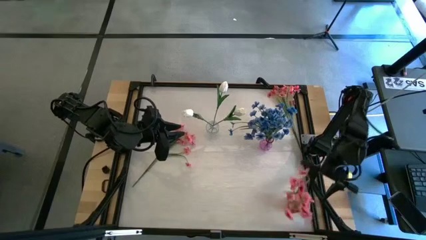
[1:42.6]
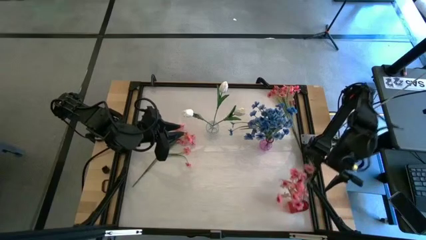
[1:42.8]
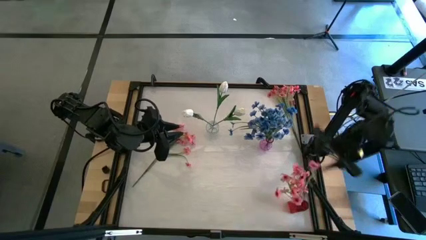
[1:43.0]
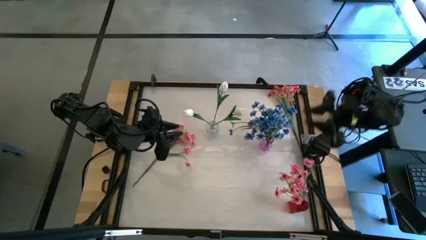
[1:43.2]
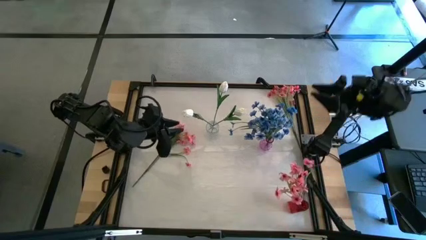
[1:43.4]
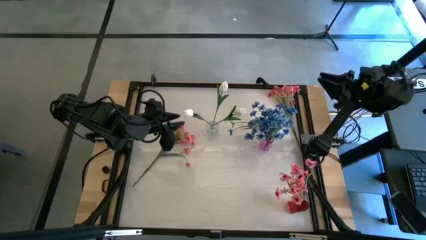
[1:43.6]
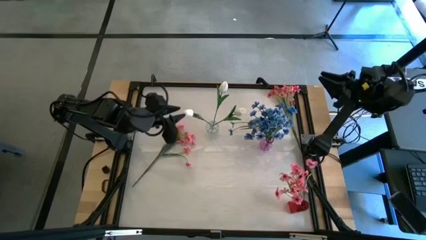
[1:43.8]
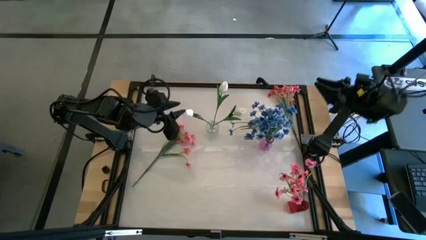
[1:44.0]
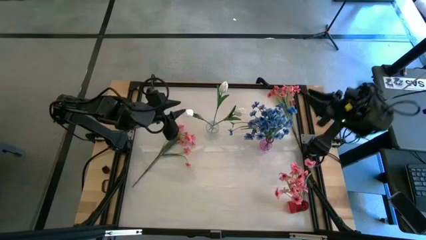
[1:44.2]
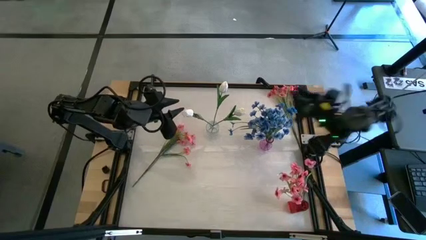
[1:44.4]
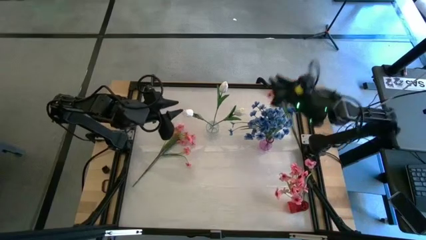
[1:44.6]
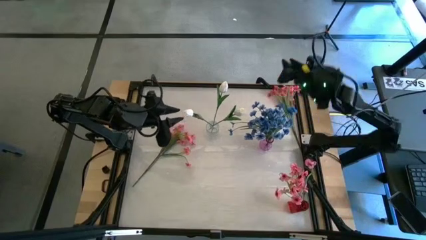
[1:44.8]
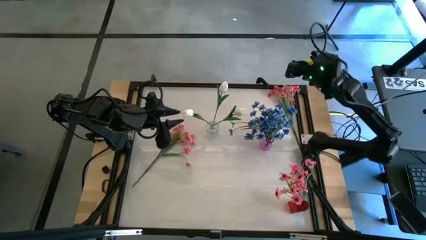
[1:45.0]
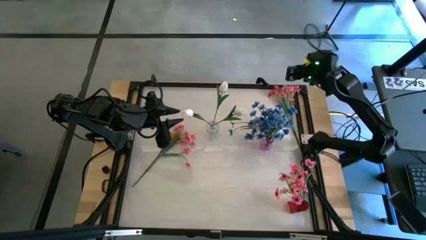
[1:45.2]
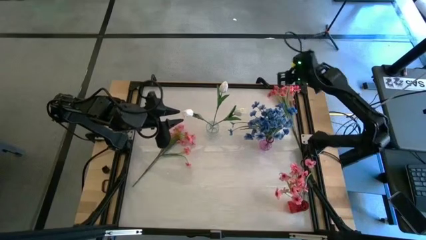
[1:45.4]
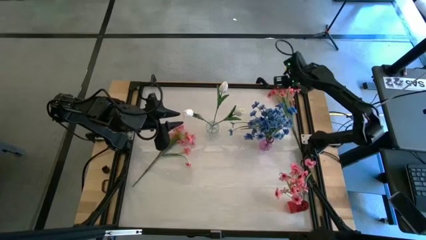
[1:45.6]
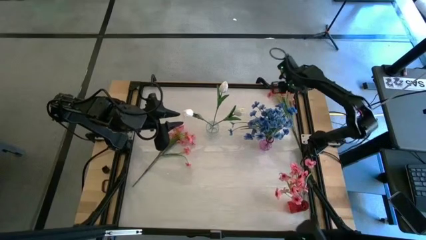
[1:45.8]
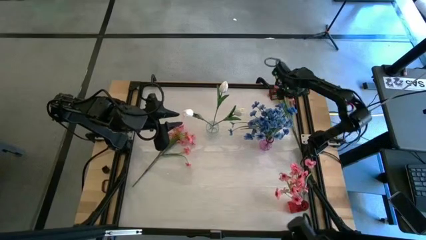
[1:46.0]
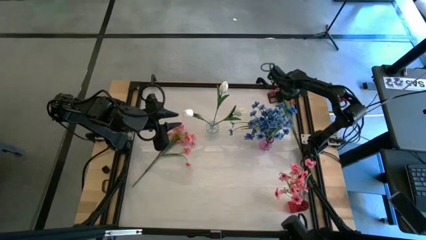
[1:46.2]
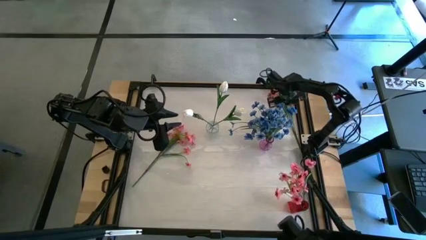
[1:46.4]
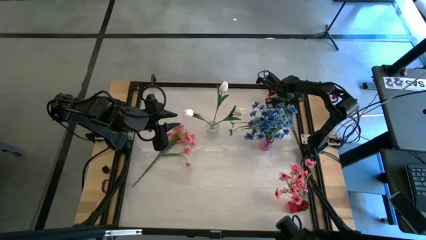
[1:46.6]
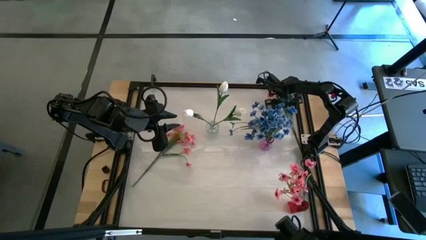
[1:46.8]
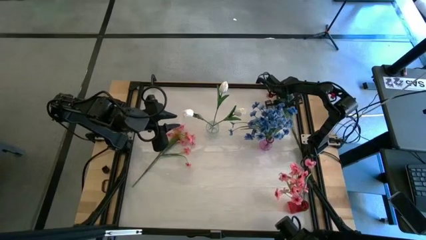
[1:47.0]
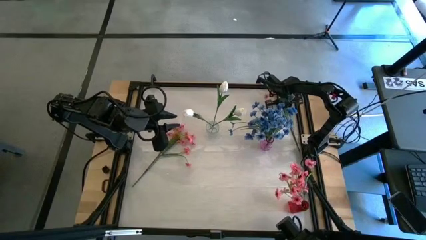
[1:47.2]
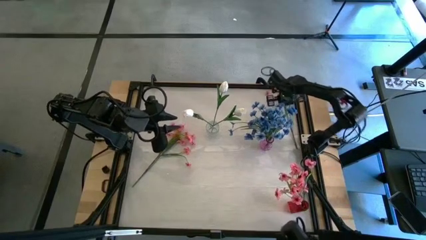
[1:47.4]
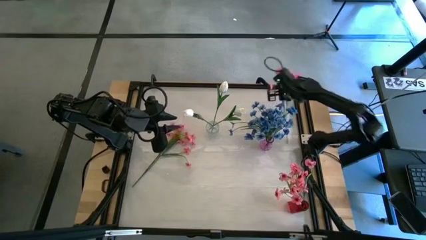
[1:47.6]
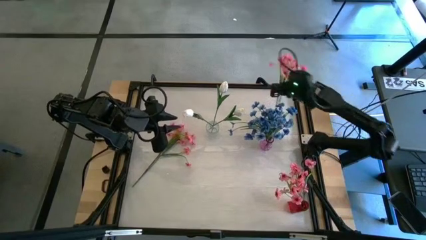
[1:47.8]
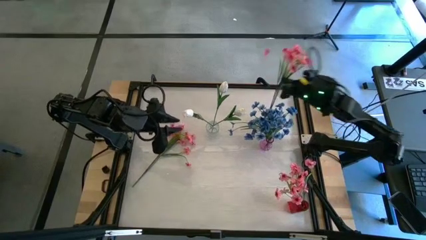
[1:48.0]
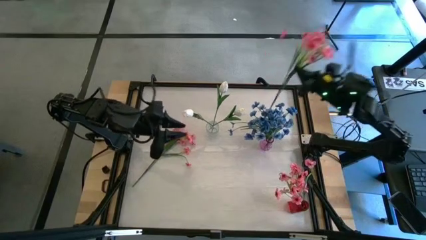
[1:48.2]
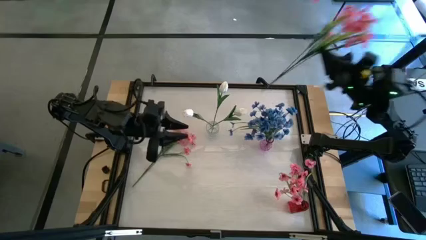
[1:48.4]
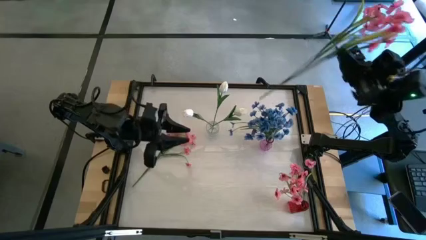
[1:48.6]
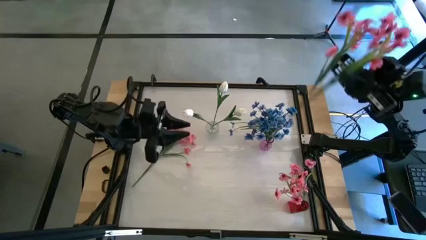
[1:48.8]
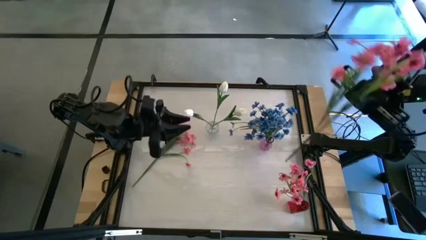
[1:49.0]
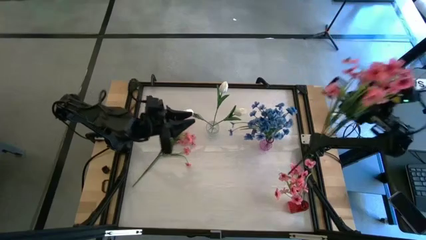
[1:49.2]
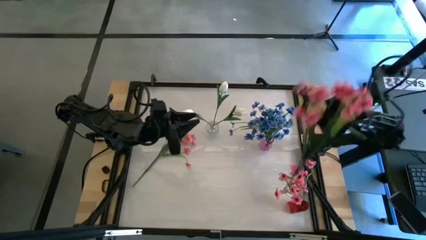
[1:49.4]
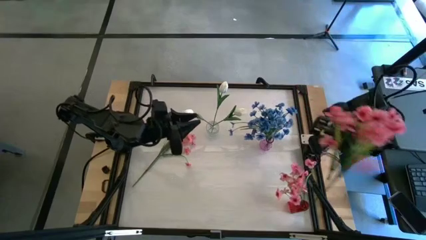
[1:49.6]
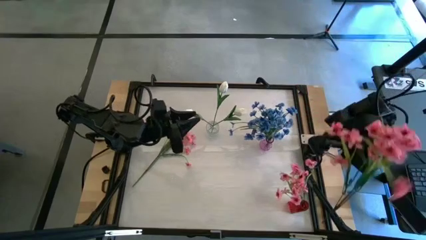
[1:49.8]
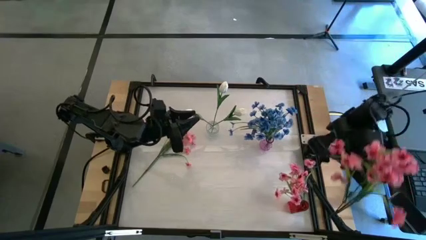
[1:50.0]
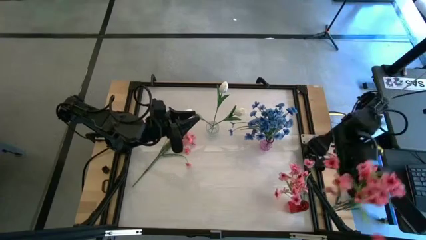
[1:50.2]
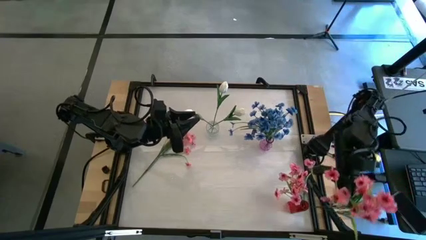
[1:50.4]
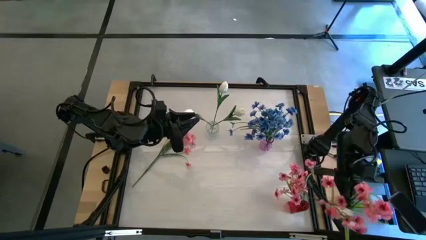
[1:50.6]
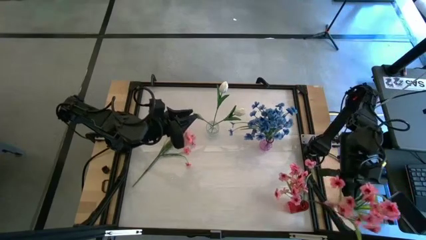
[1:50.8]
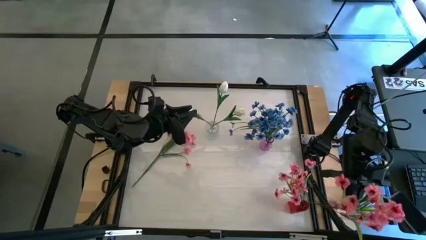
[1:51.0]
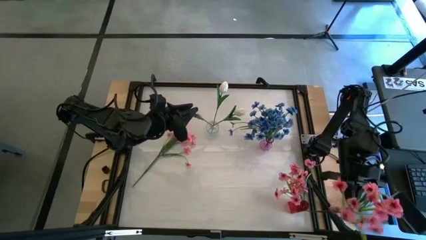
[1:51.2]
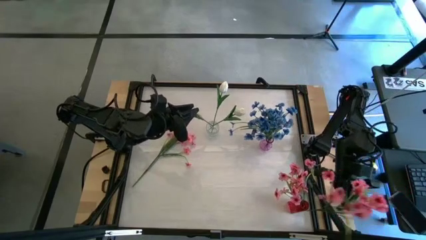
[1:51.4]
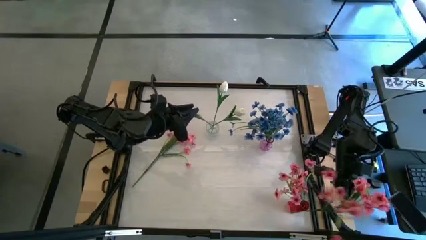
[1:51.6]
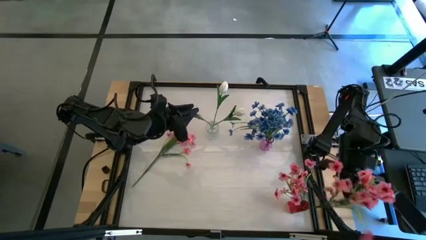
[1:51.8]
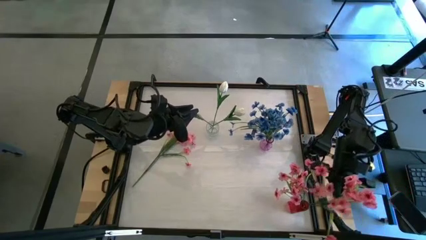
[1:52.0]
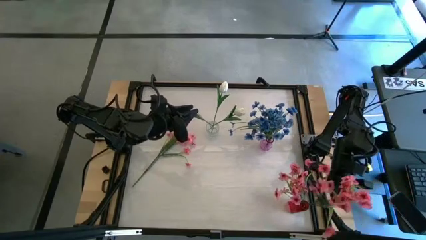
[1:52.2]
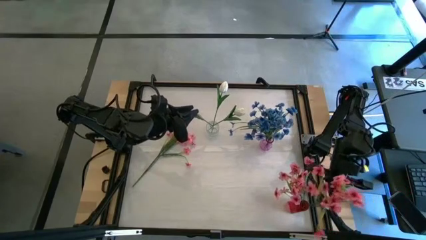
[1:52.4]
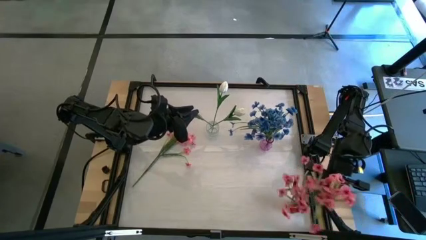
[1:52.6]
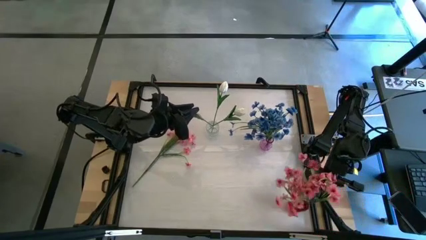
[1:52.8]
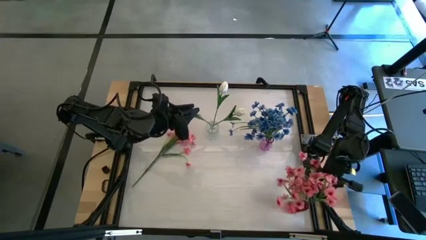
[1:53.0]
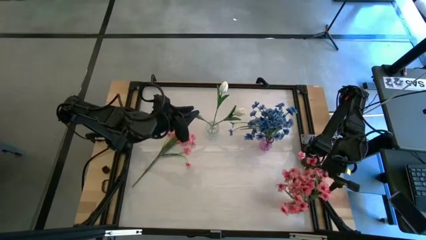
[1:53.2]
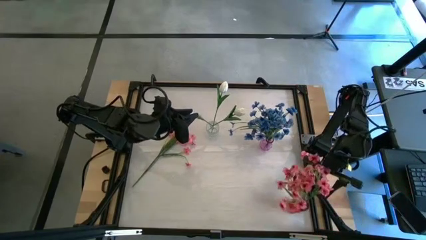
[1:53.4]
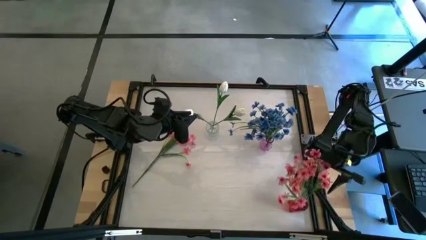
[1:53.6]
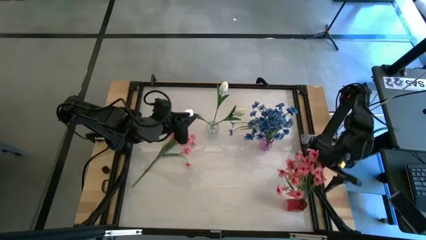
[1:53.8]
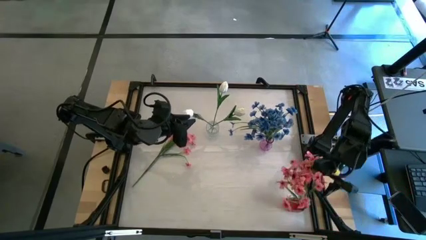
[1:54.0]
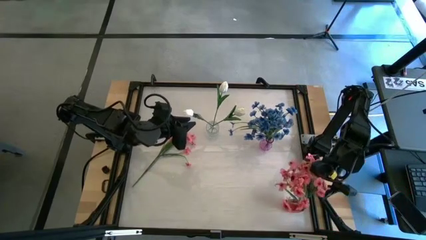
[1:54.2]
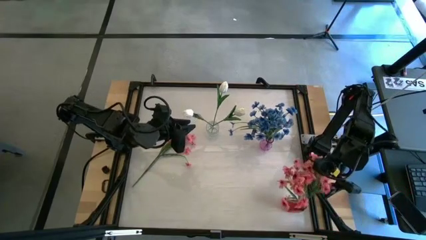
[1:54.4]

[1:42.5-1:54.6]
Task: Sort flowers into vase by color
Put the right pink flower into the red vase

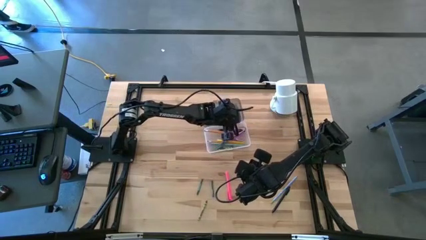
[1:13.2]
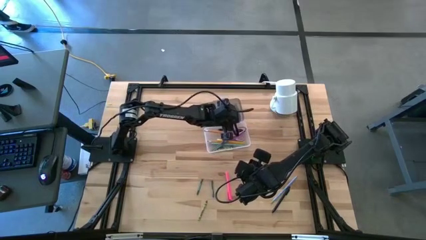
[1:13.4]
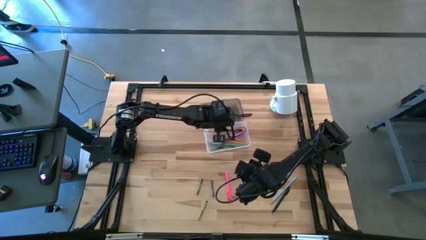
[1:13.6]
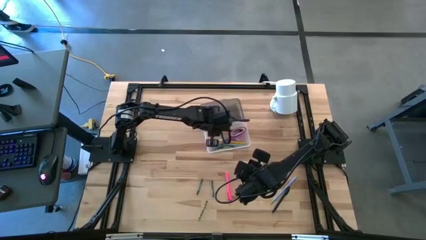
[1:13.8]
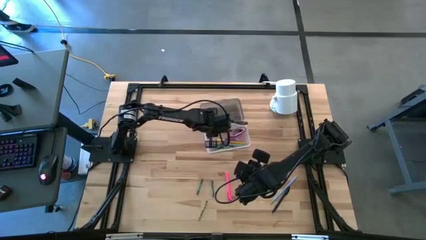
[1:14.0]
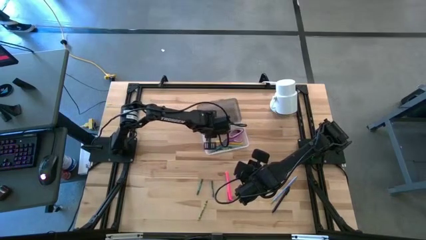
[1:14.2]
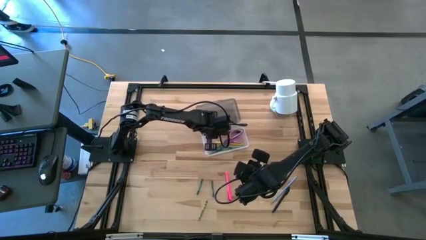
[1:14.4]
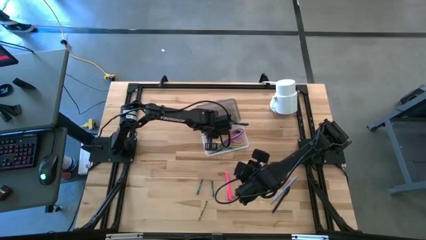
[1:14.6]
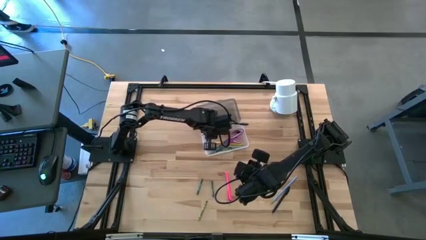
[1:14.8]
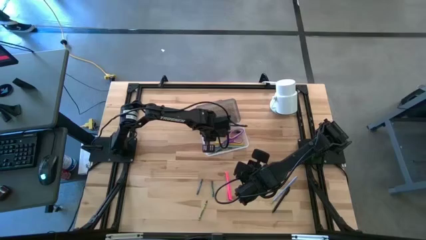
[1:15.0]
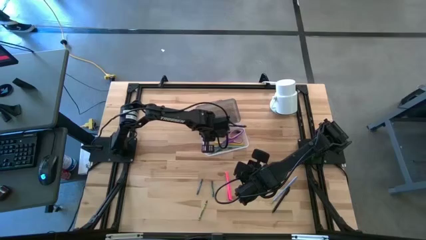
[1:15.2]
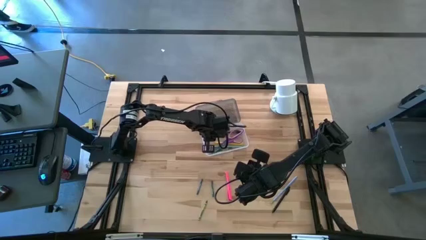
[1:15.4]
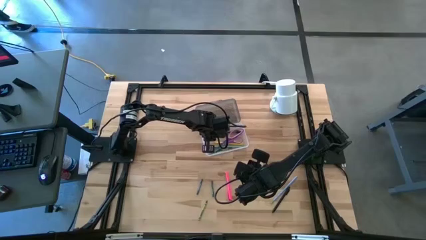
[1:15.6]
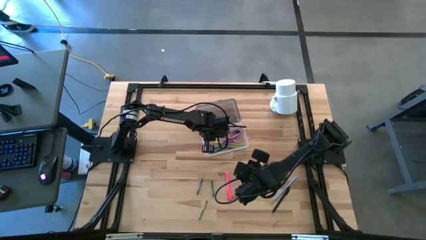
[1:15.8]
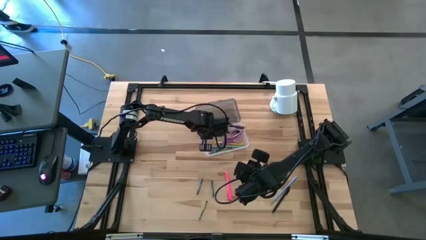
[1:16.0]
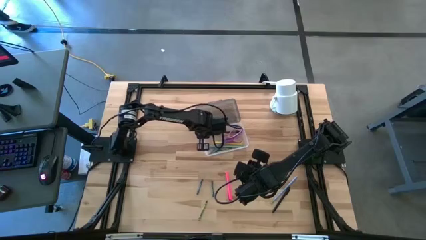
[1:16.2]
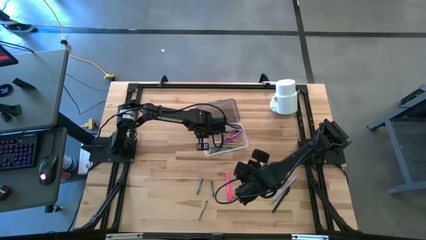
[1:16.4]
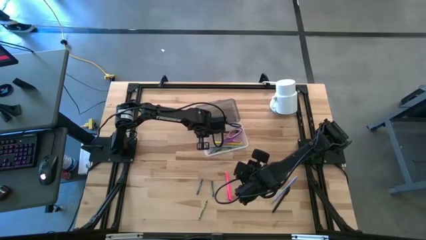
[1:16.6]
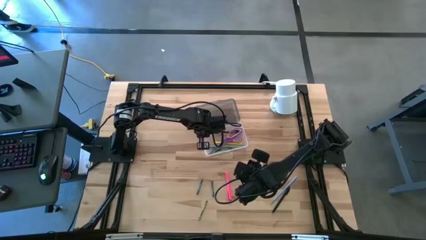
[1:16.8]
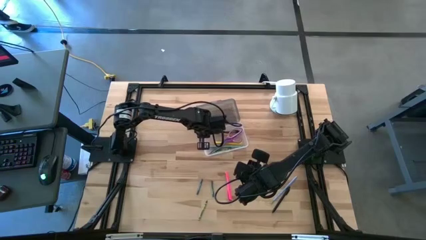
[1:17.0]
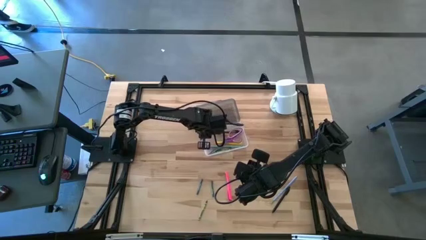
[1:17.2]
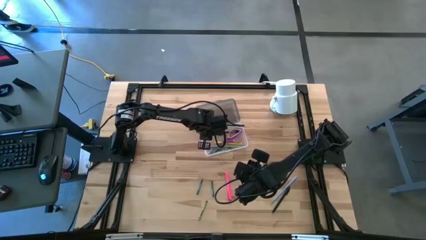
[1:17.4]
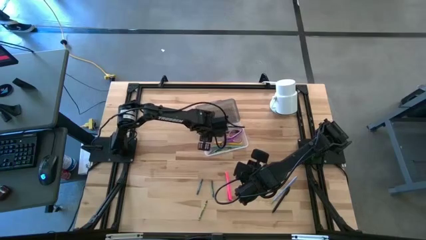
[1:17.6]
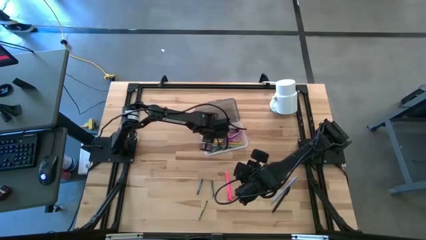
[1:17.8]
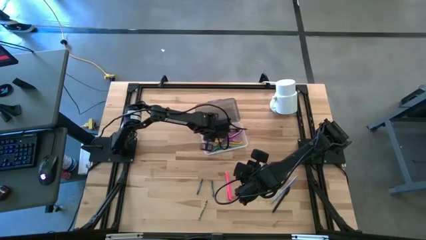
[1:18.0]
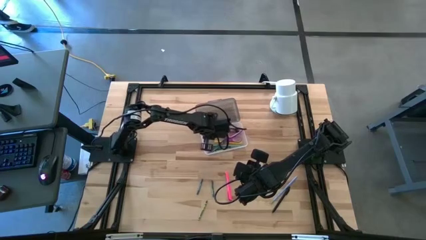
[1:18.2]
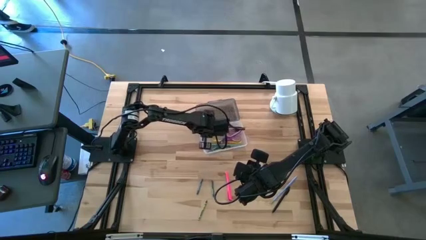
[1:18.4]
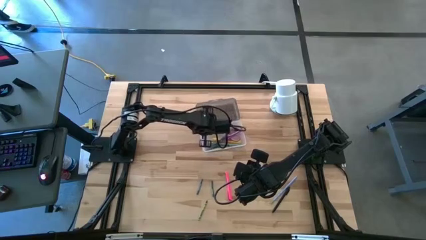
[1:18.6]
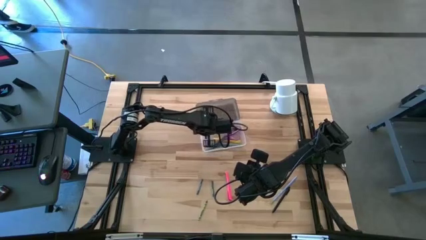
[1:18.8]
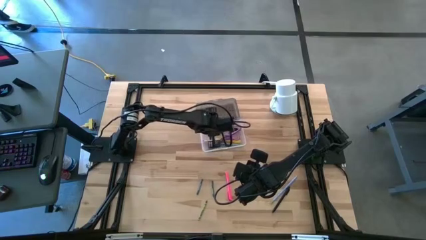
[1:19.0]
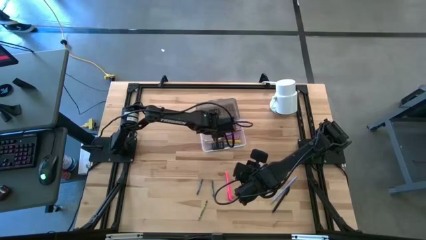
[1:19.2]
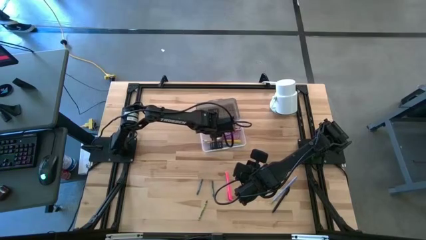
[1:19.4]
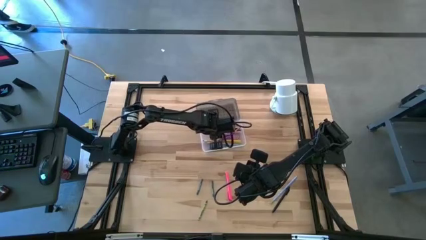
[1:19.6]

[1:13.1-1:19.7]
Task: Pick & place school supplies into a supply box
Adjust the orange pencil
